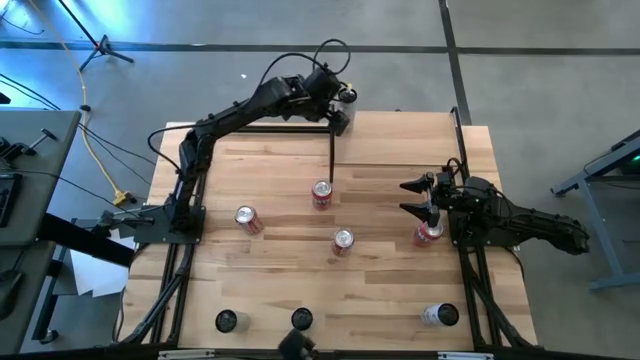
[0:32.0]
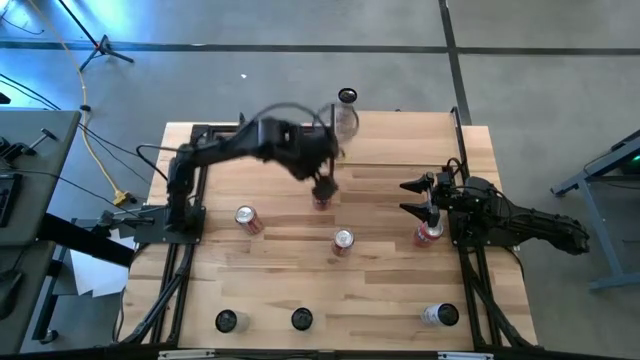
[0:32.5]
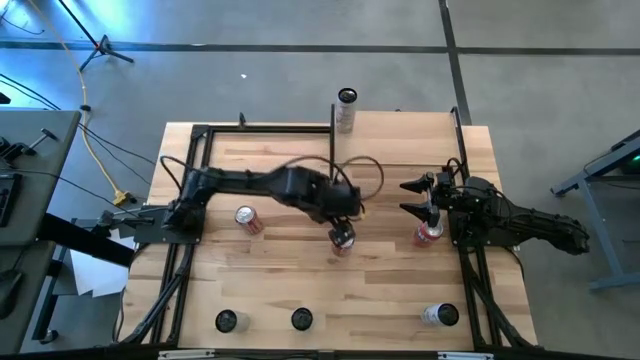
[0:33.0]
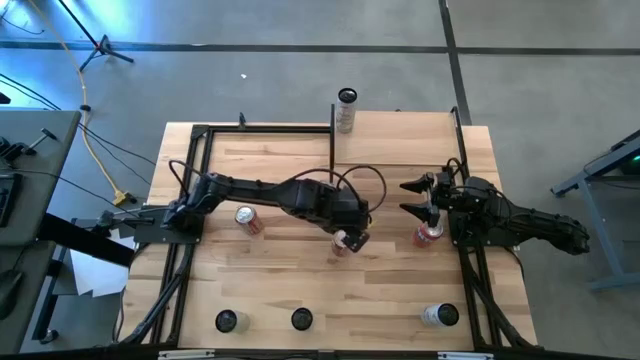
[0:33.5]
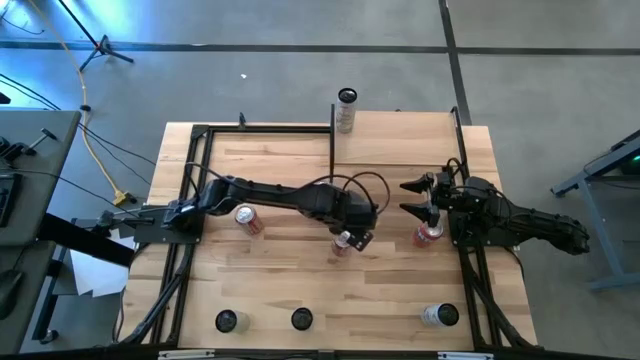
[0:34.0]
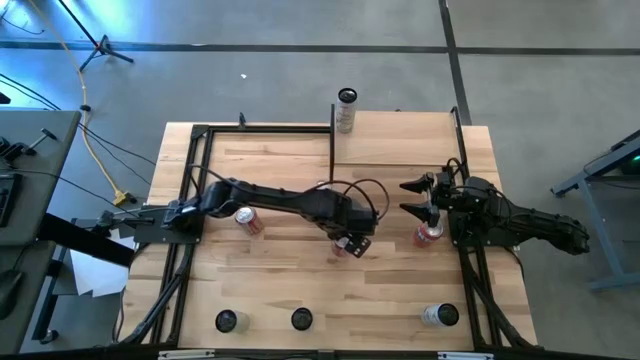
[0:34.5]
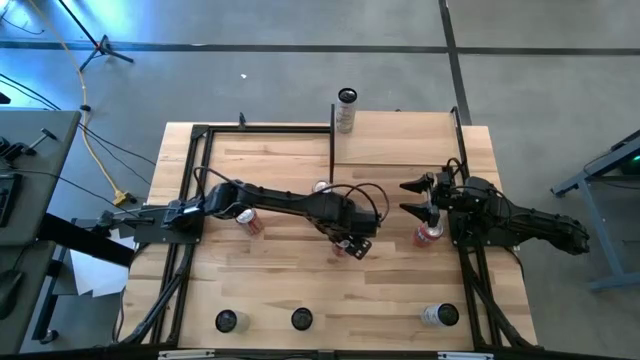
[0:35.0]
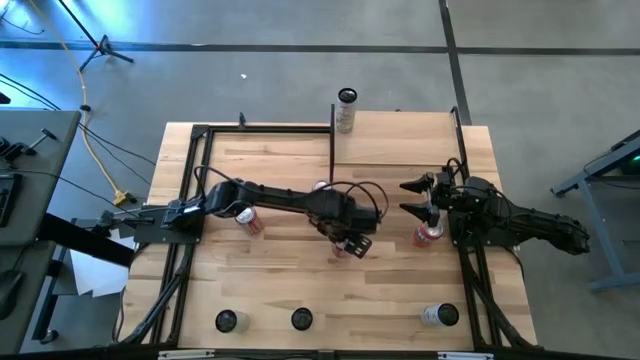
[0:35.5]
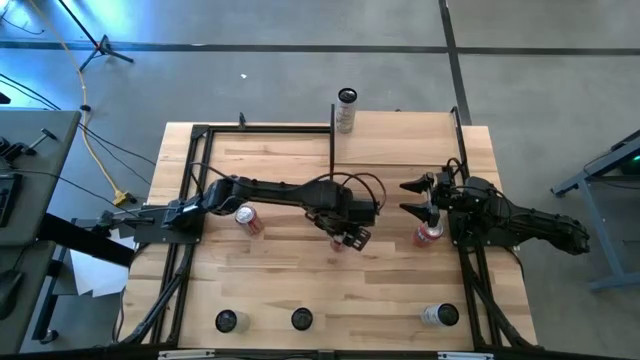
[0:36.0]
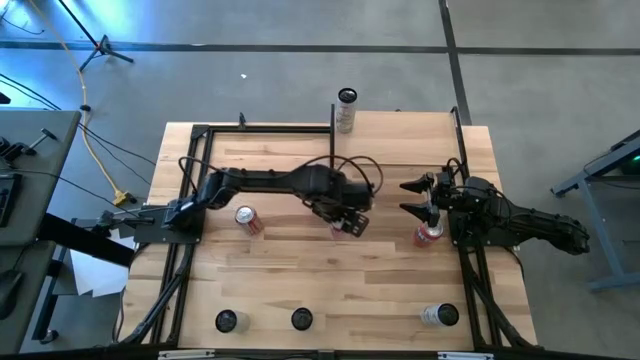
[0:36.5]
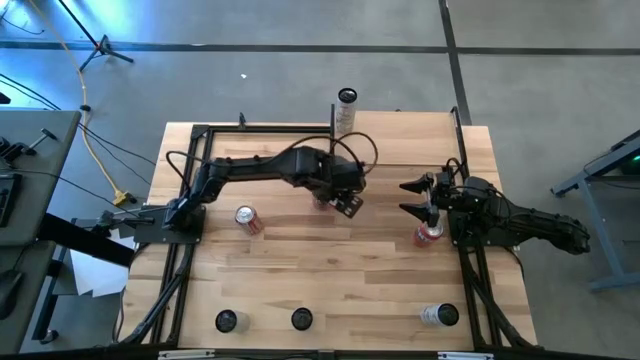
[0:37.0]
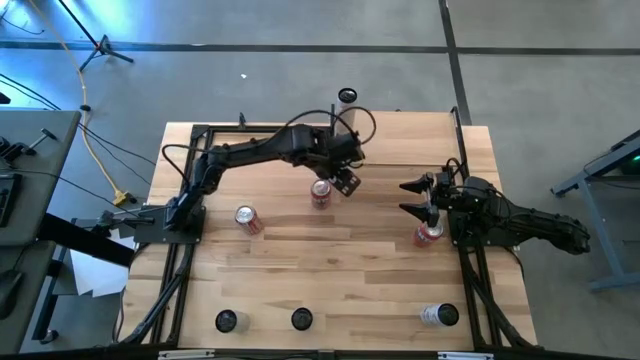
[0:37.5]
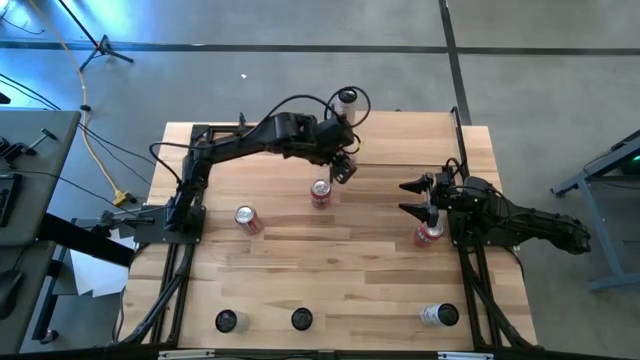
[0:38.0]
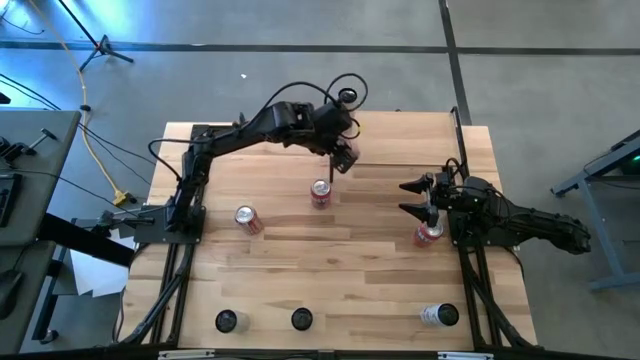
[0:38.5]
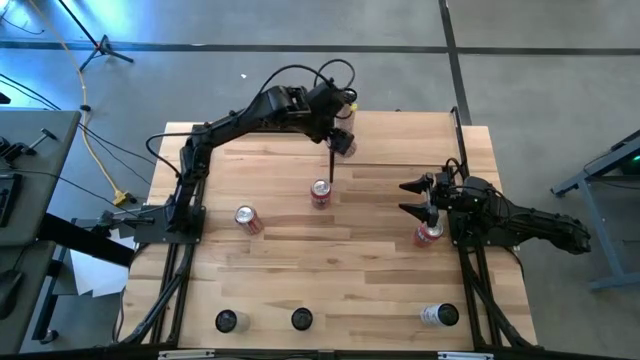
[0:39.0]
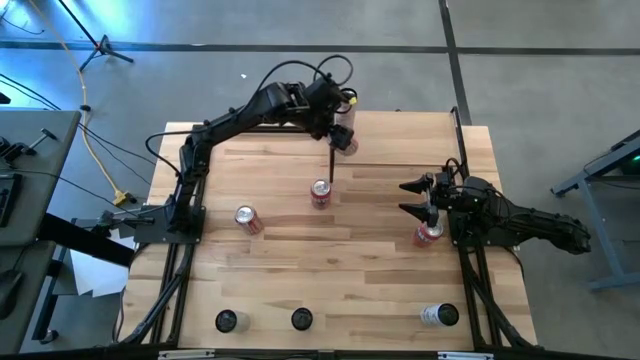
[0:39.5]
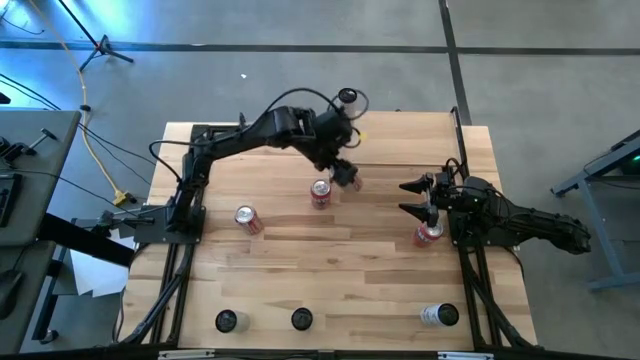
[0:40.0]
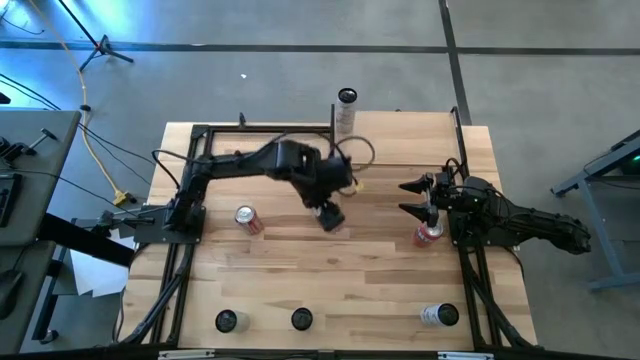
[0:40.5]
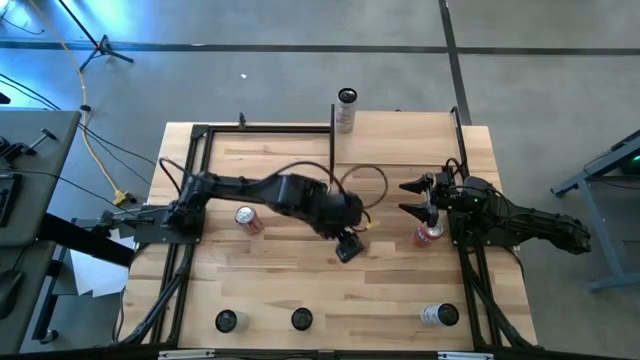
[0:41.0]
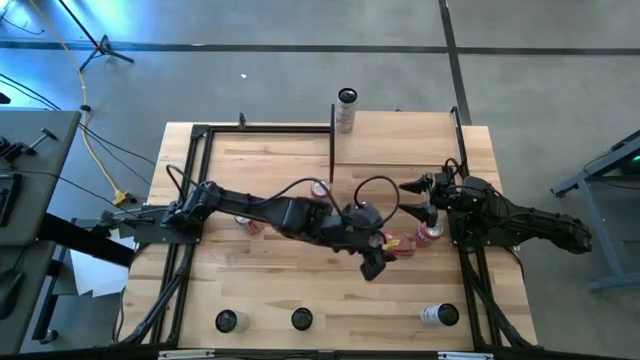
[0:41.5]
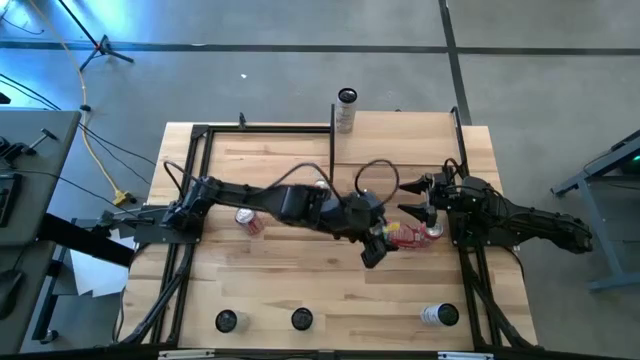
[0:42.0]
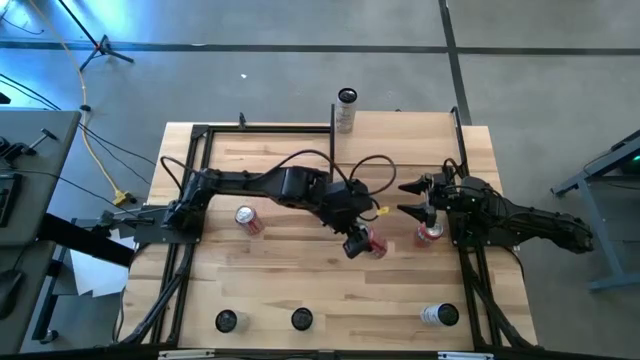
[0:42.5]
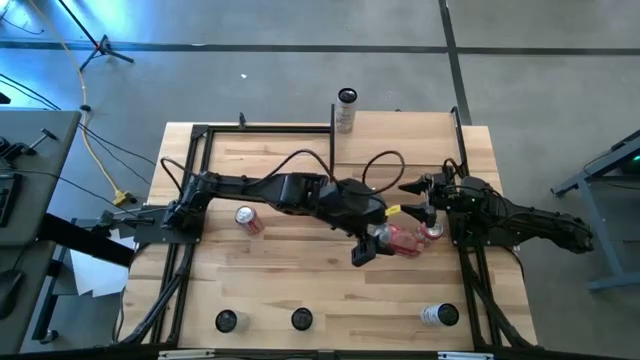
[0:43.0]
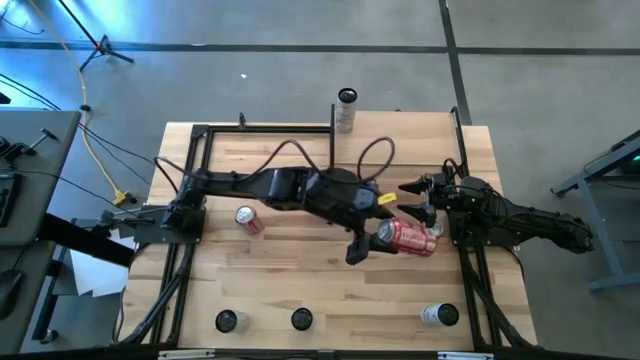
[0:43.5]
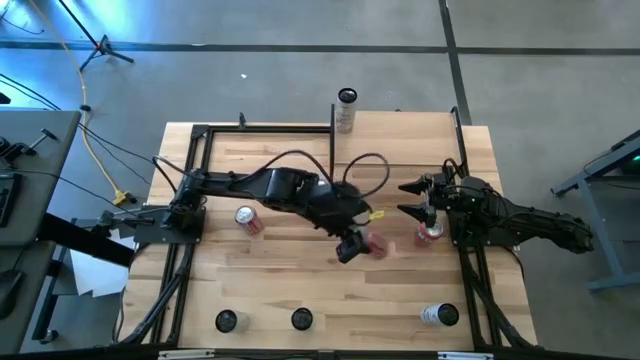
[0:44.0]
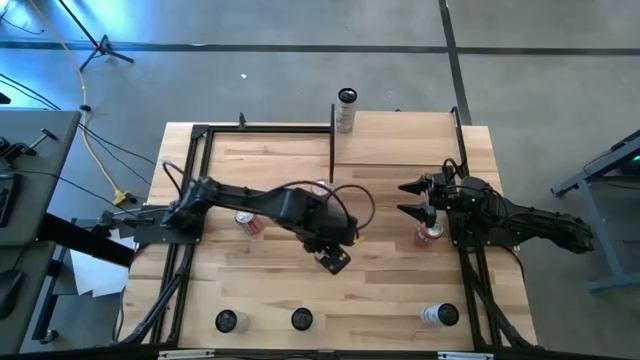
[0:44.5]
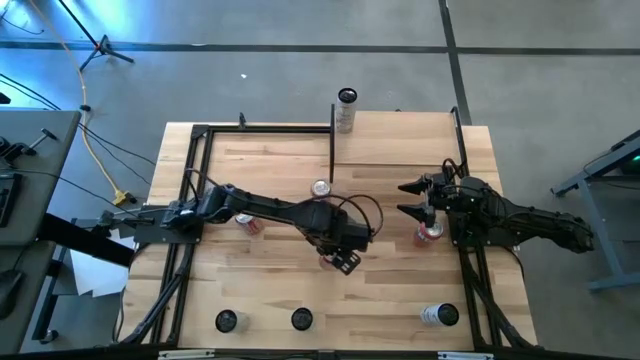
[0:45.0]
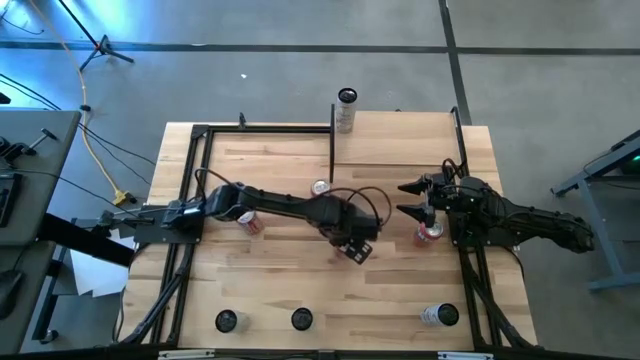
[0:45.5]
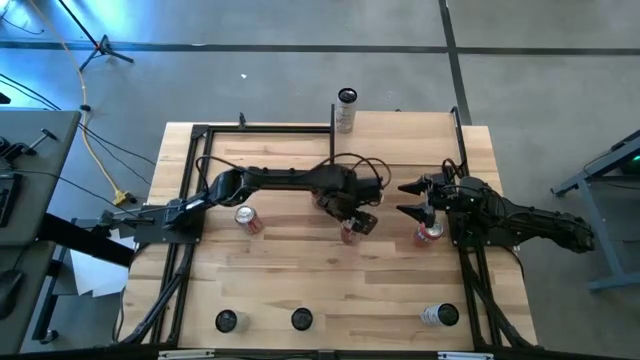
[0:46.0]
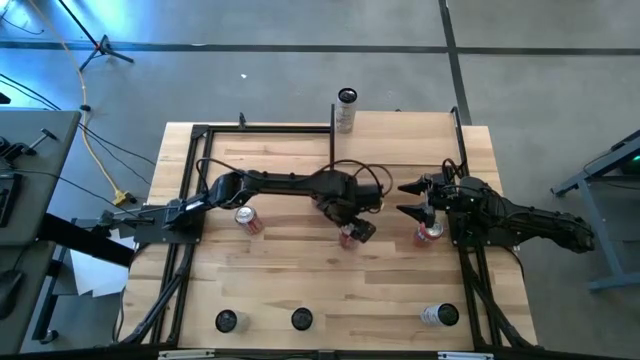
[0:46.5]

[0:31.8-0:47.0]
Task: Place canned beverage on shelf
Put the right the red white soda can on the shelf

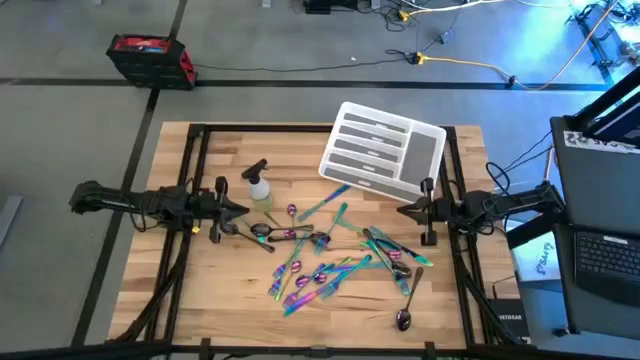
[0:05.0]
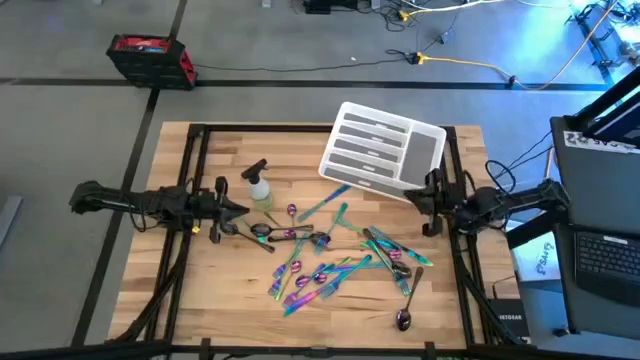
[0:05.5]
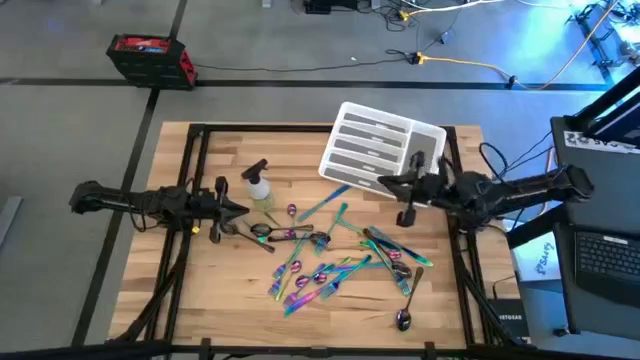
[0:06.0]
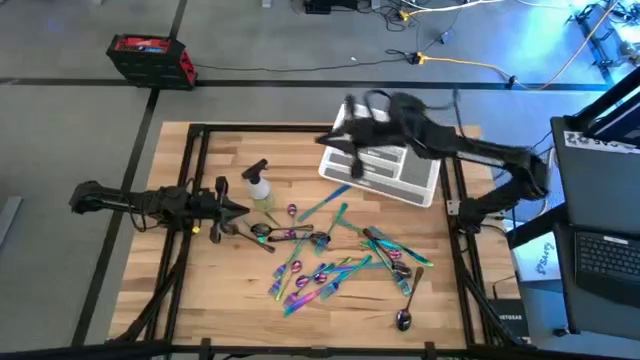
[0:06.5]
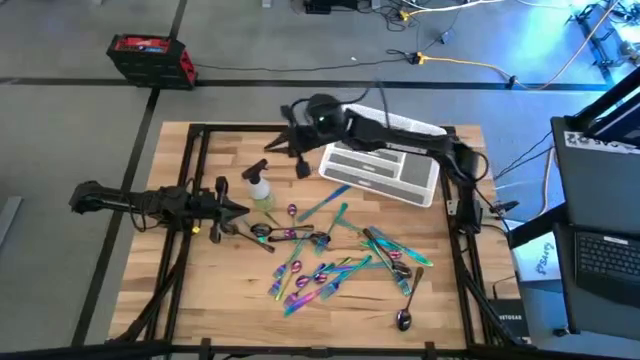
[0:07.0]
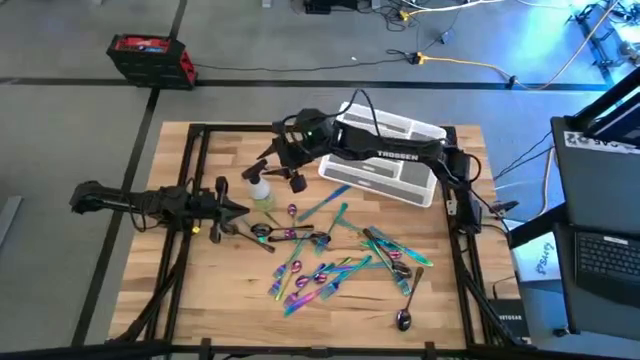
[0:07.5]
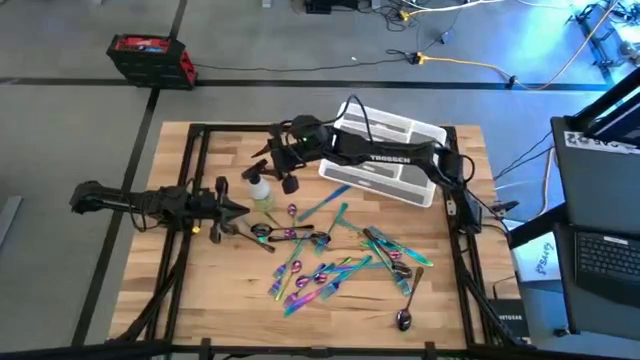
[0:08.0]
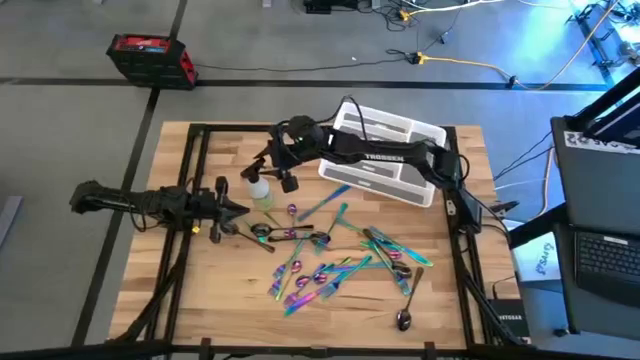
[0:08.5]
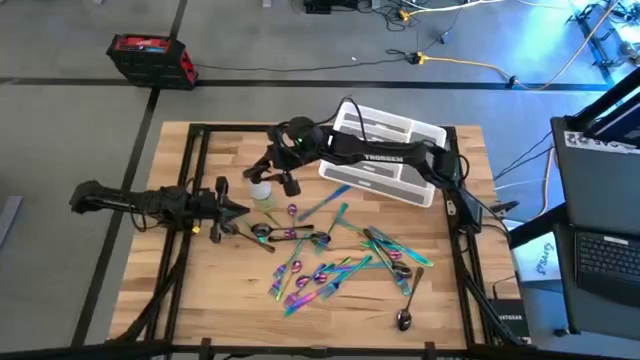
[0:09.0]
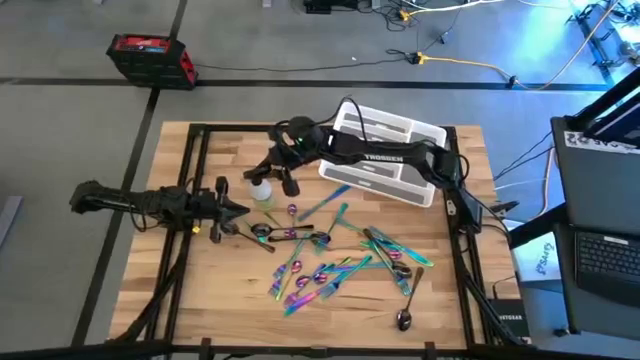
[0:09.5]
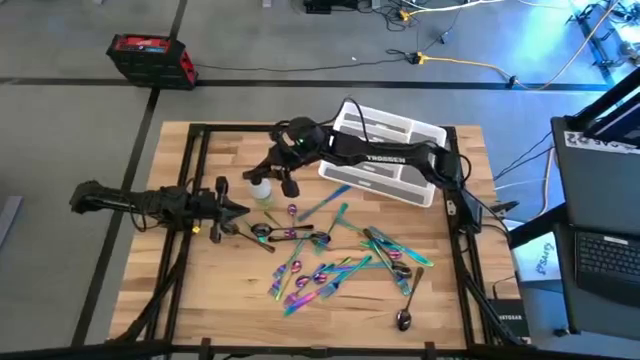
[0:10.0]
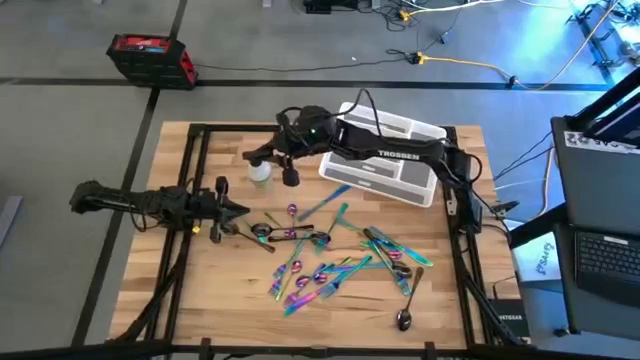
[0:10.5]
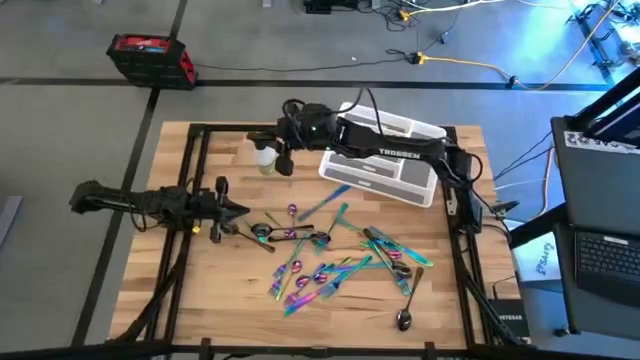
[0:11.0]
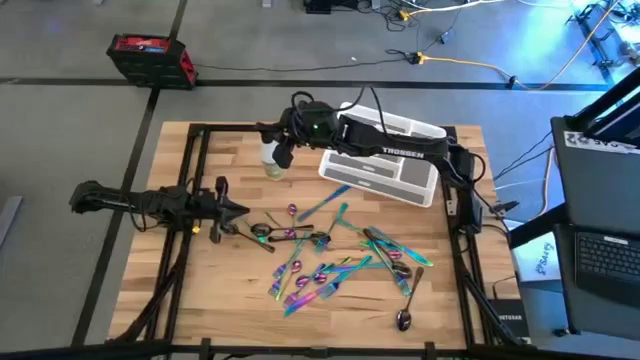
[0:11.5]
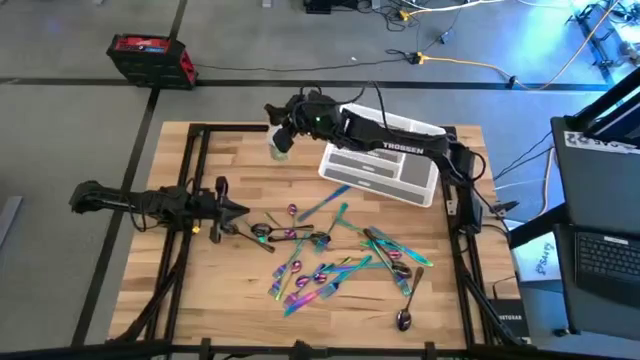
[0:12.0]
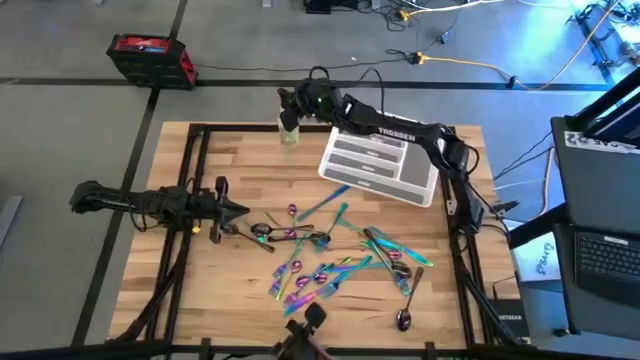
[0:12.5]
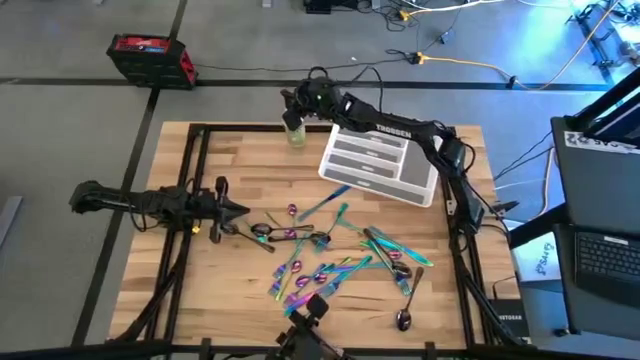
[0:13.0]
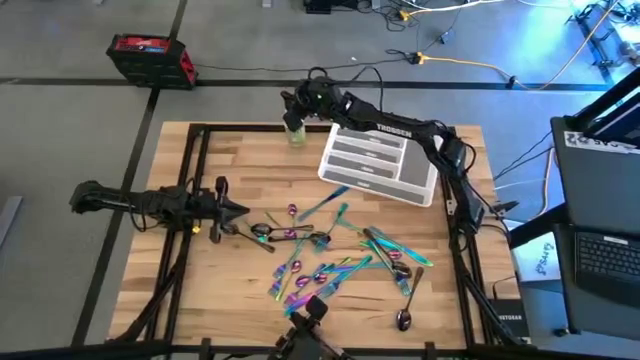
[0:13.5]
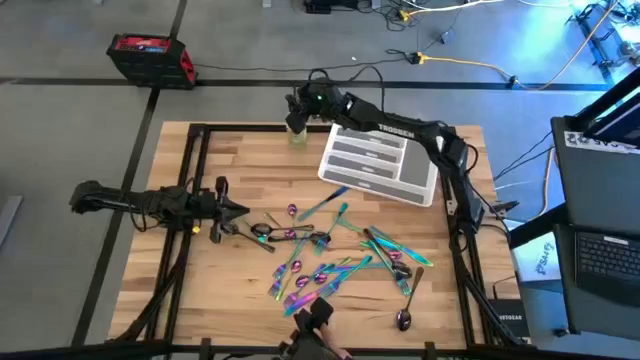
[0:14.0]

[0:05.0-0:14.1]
Task: Sort silverware
Move the white spray bottle to the top center of the table
